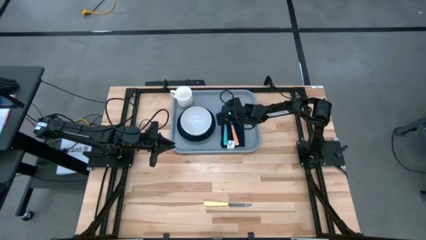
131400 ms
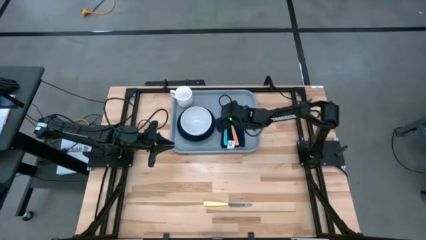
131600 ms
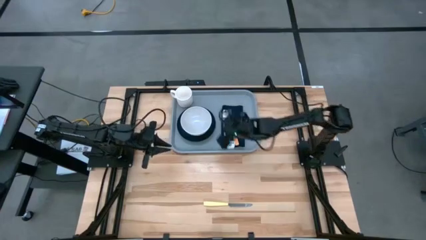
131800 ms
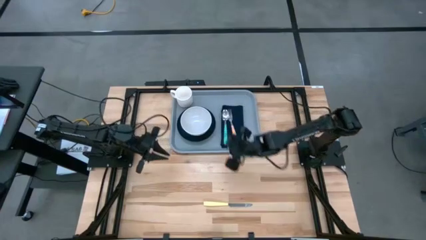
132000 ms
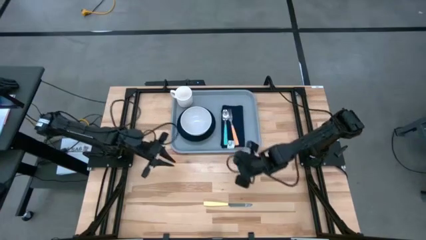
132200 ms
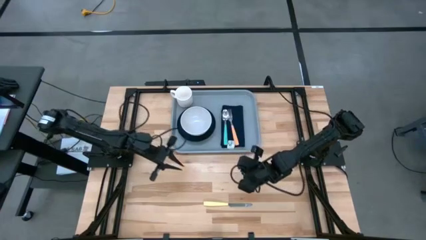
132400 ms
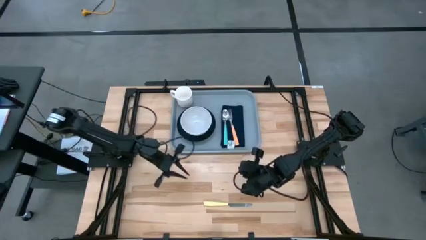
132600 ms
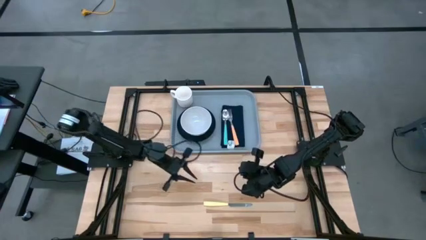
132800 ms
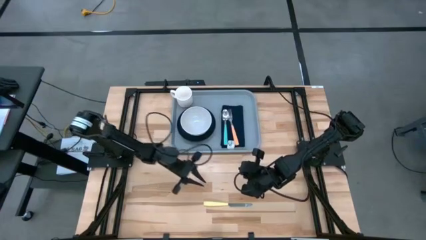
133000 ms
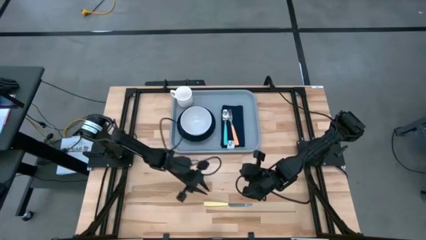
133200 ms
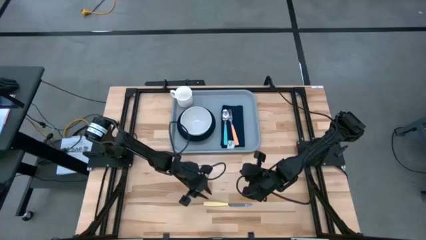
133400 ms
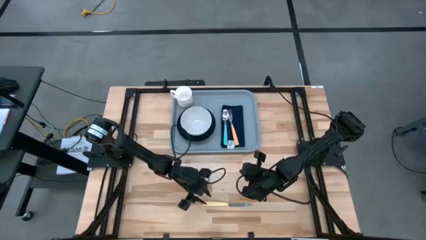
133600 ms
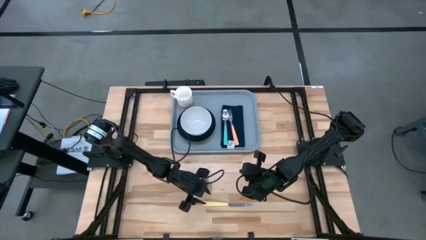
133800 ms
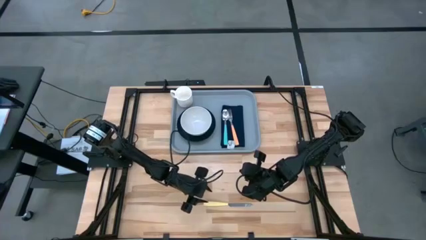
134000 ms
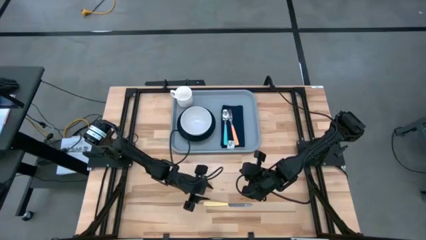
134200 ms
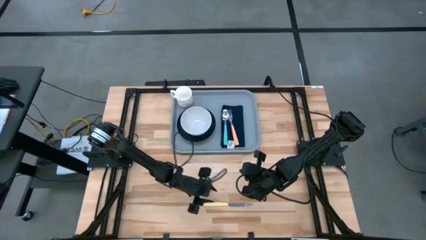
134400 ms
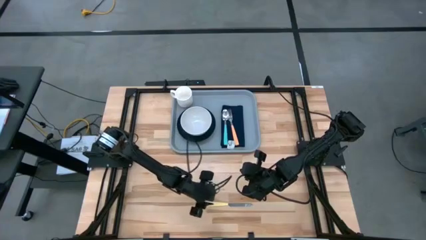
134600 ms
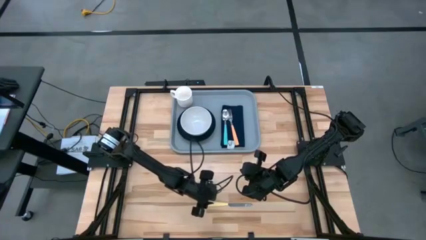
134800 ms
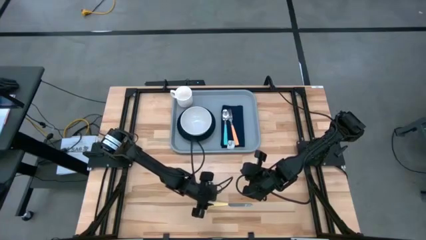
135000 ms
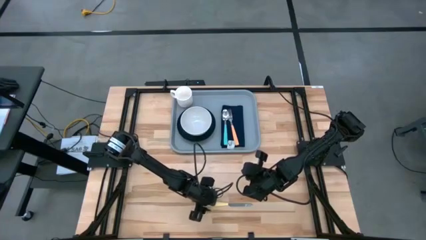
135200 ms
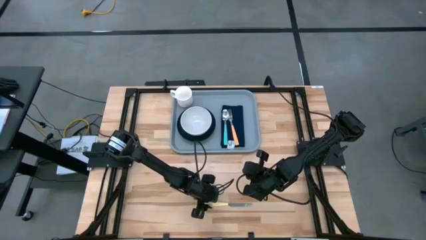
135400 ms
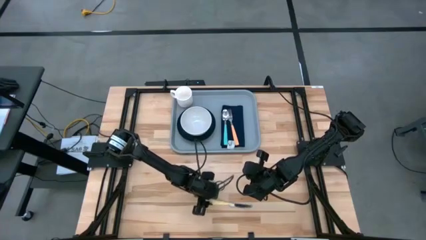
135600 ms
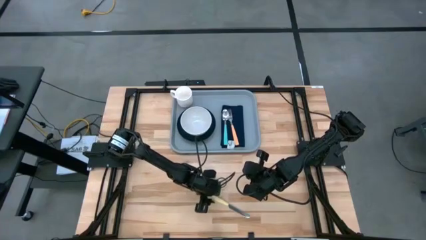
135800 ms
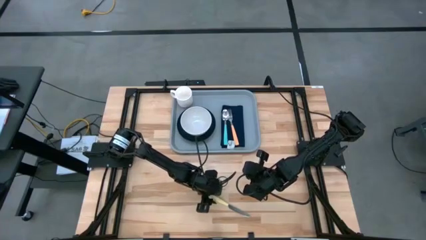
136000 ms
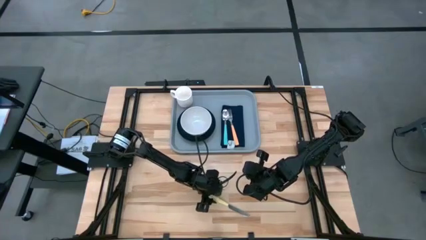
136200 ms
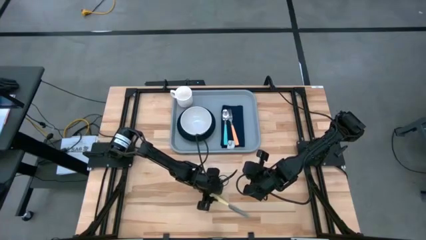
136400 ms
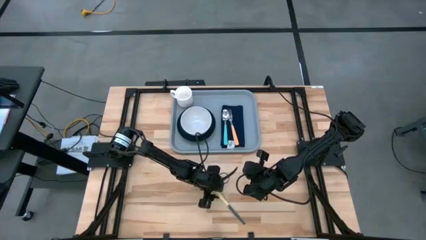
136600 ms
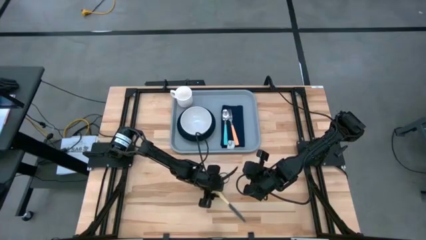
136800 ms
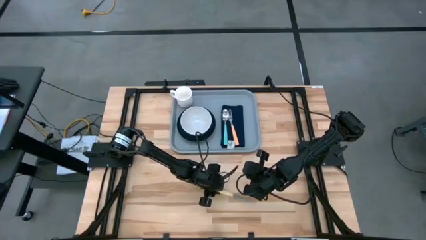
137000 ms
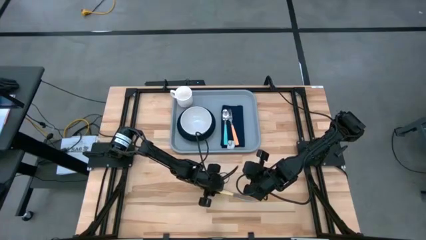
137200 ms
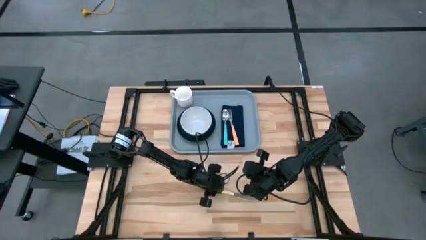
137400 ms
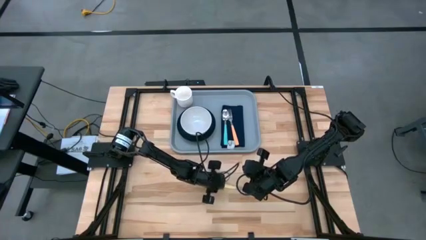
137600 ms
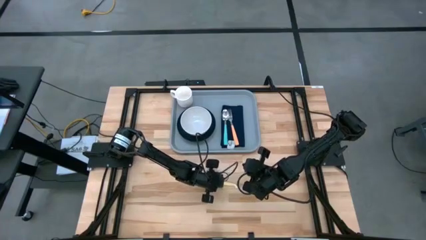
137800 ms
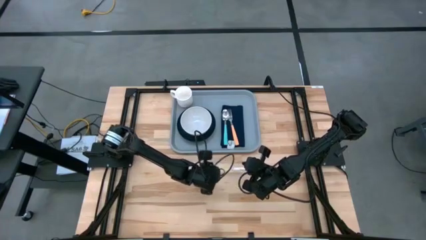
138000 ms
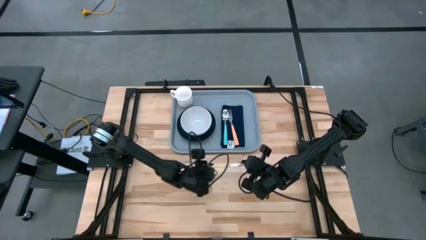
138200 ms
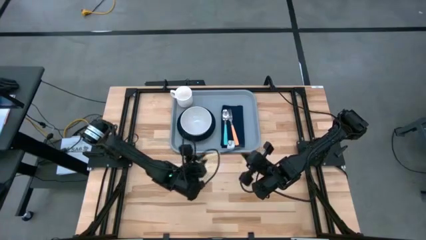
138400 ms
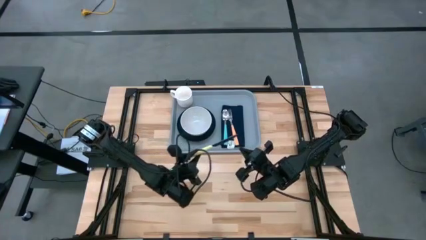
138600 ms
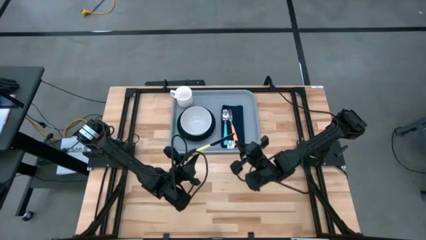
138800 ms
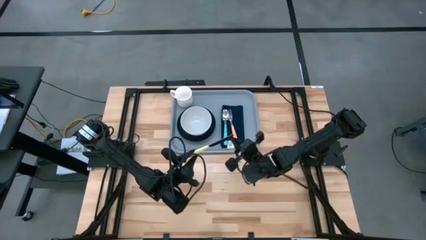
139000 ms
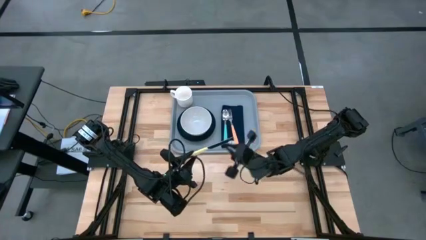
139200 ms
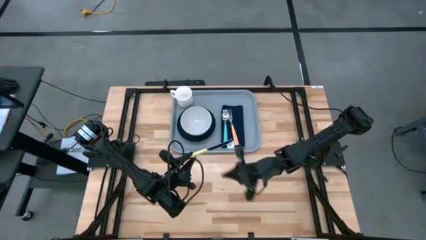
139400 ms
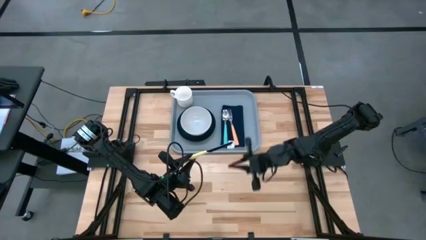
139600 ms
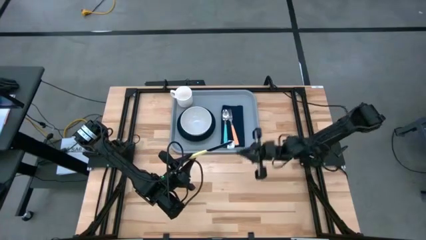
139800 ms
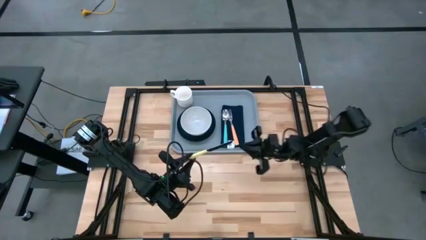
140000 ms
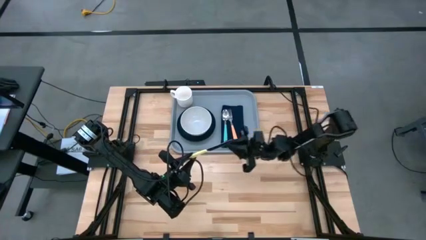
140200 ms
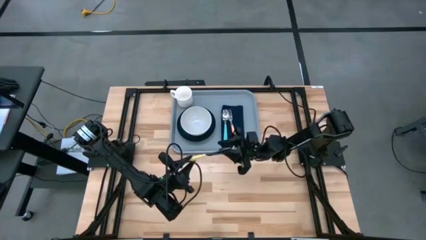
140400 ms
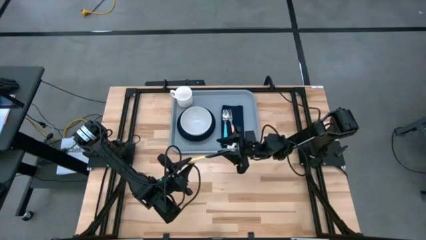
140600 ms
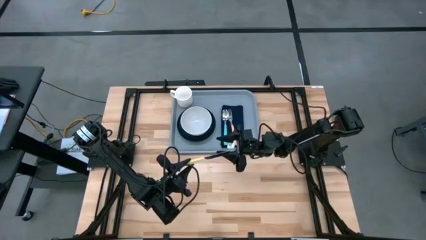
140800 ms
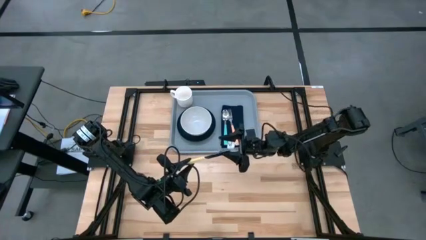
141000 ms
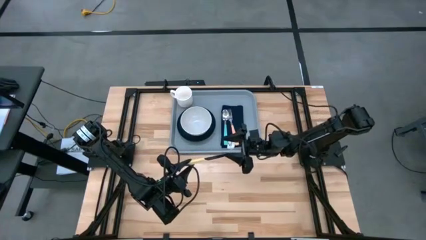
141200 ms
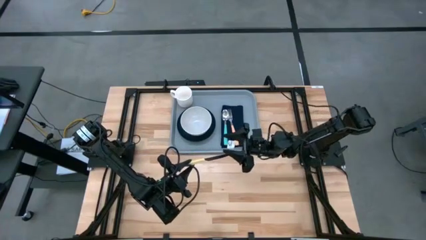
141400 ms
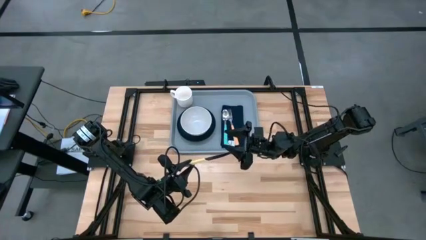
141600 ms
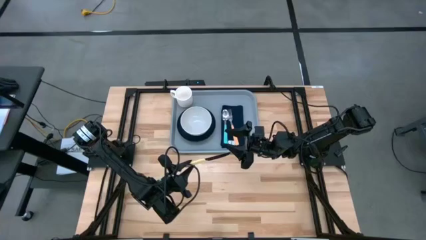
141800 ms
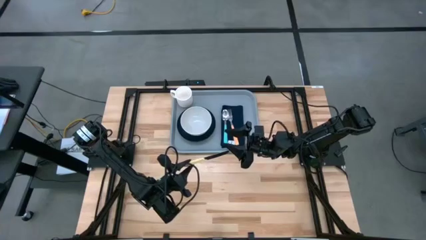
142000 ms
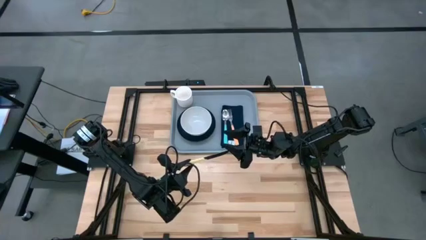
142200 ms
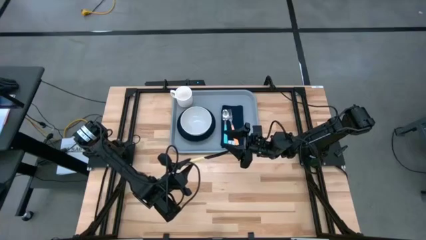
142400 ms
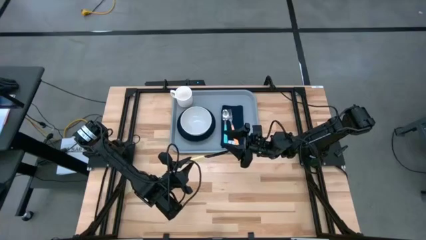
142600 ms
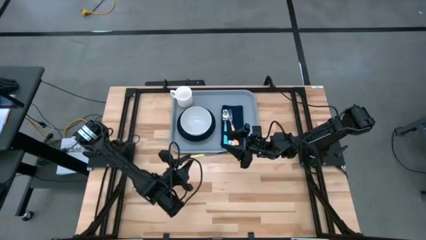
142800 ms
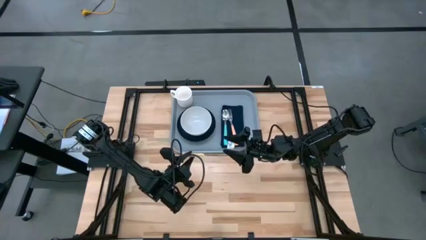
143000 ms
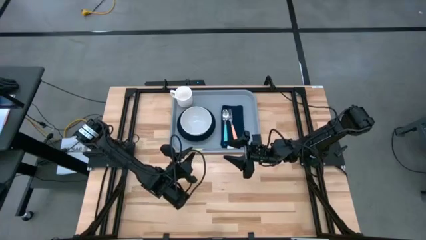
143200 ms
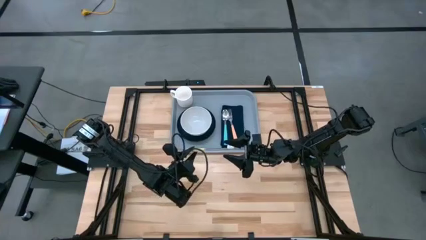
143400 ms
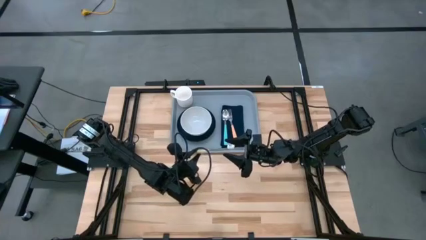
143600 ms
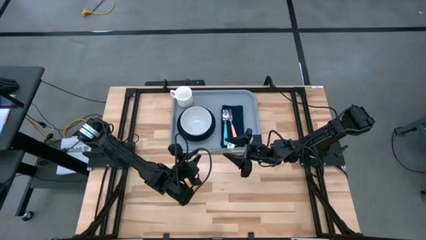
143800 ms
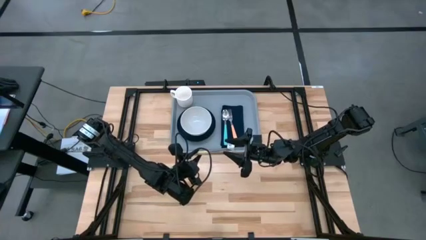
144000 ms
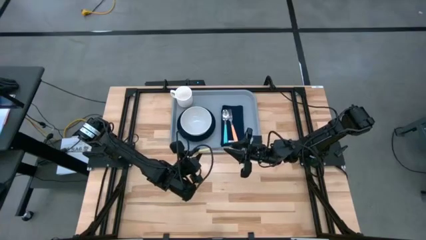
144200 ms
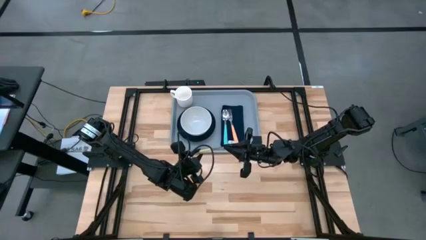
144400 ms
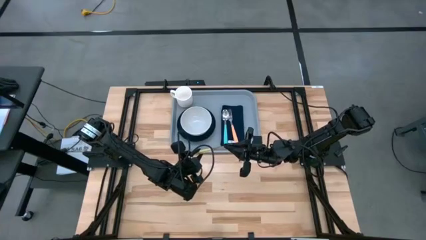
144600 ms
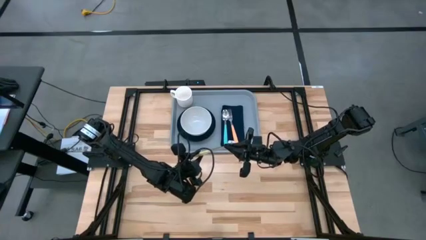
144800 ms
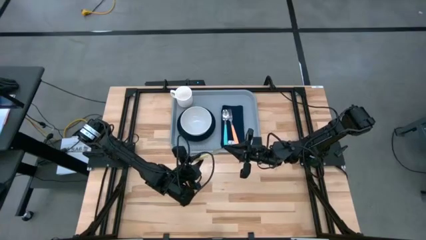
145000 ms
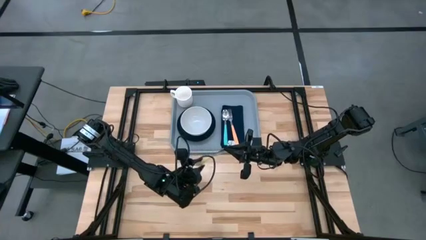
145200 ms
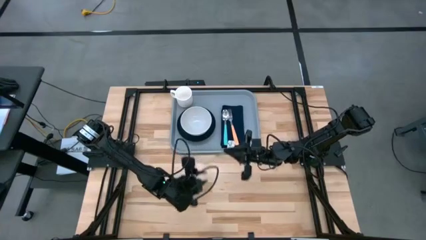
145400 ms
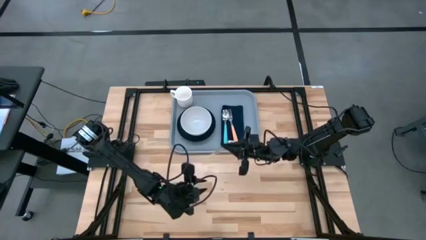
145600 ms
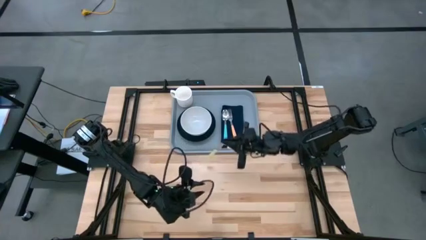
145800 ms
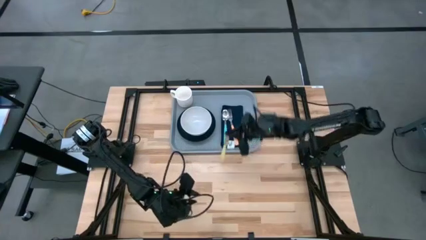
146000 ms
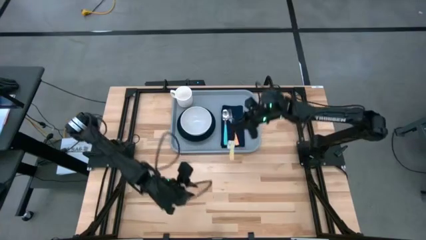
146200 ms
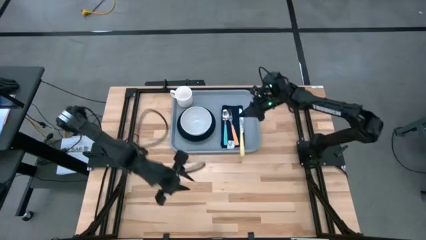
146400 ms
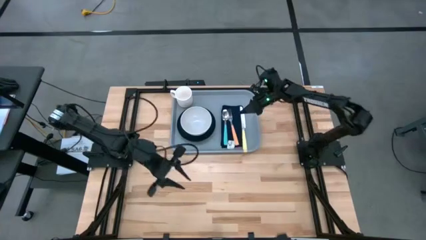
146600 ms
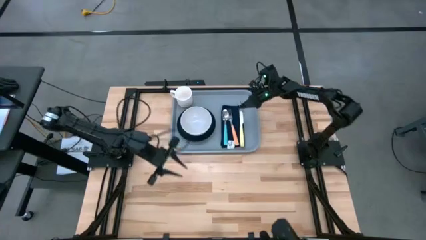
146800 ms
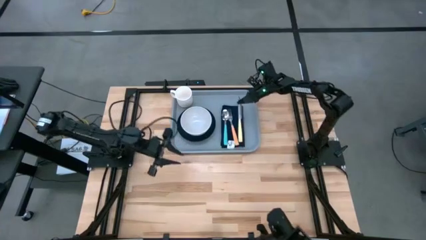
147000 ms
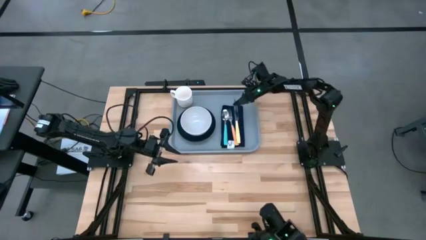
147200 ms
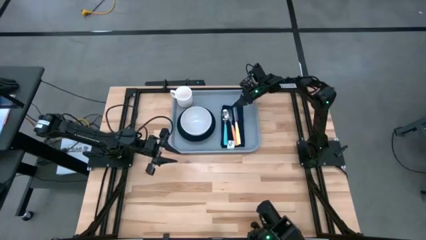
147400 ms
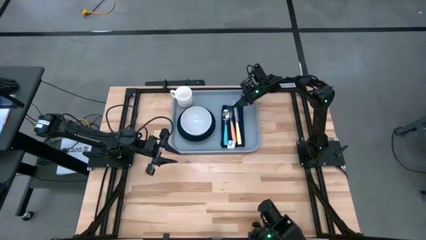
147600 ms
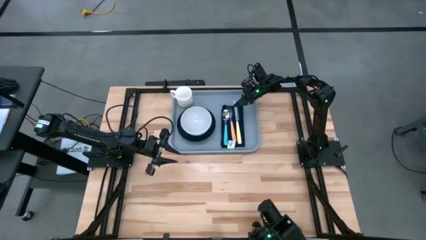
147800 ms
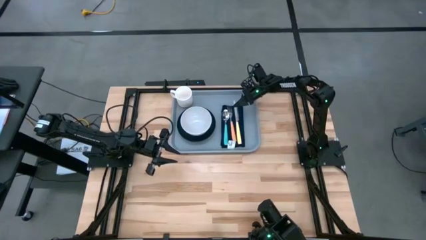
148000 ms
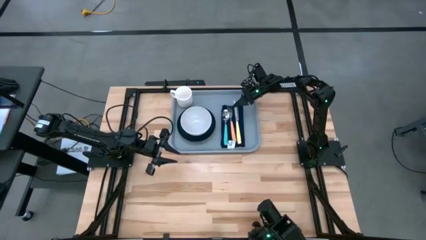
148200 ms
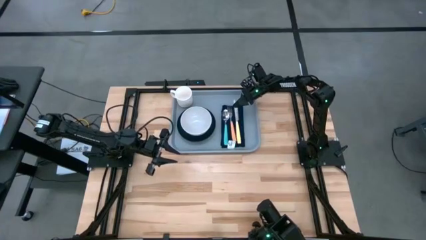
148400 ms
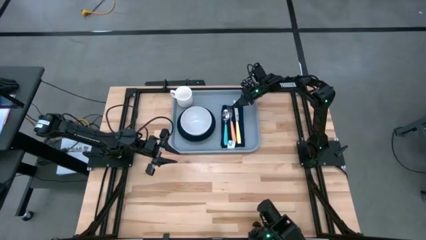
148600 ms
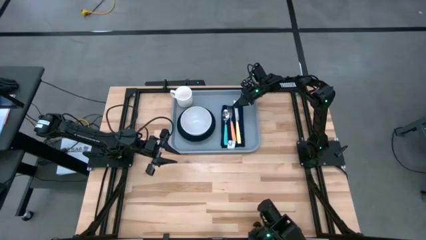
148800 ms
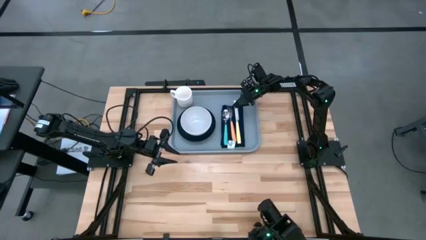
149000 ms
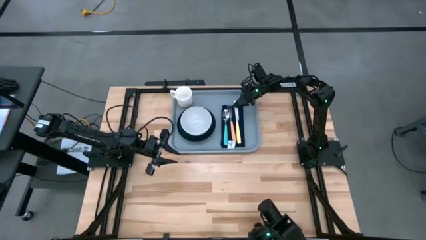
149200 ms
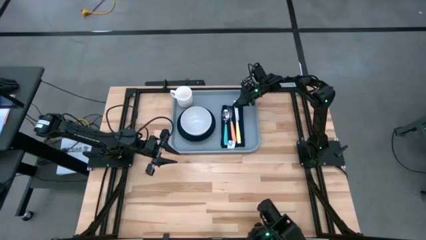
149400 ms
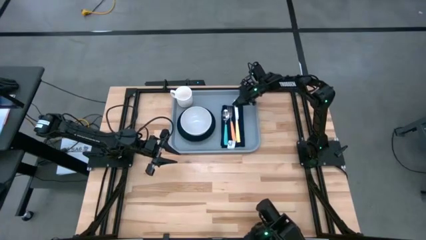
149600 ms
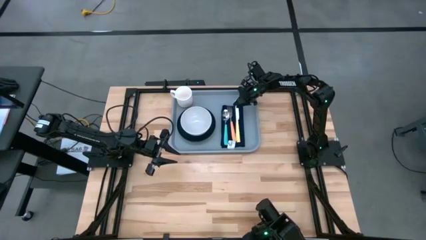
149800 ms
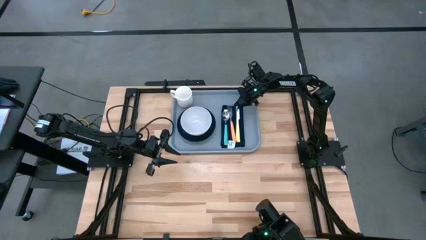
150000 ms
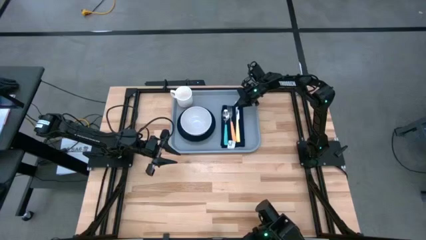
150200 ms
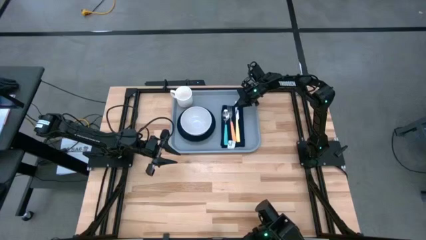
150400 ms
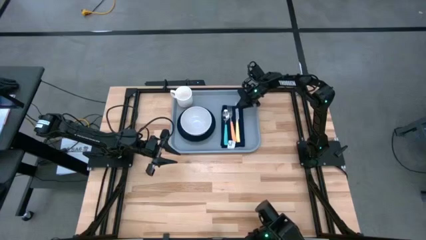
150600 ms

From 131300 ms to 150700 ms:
Task: Set up tray
Put the yellow knife on the blue napkin to the right of the orange fork
